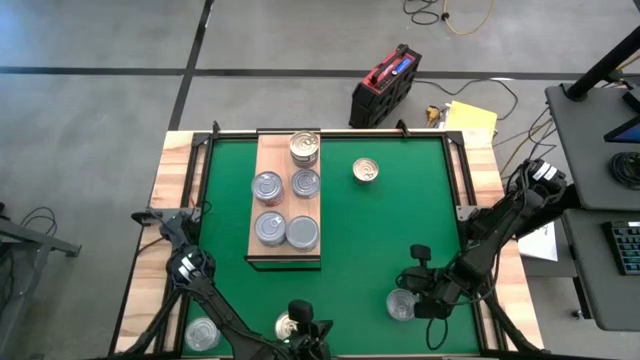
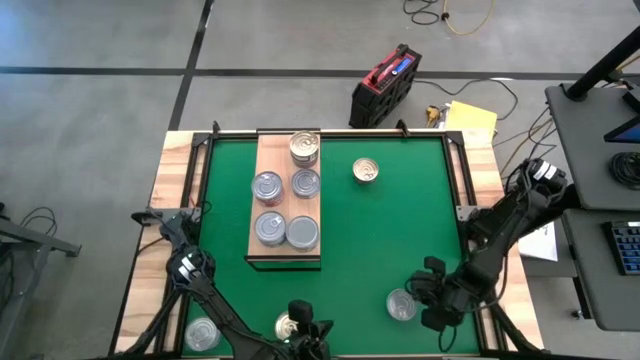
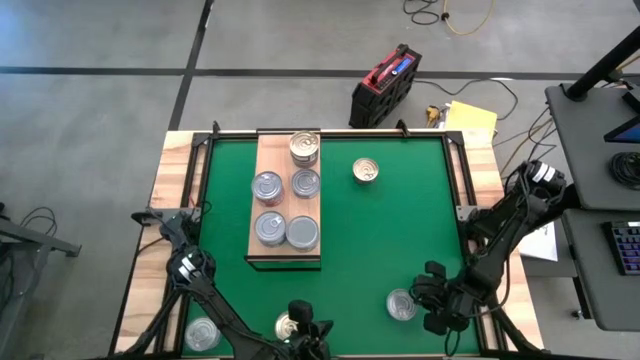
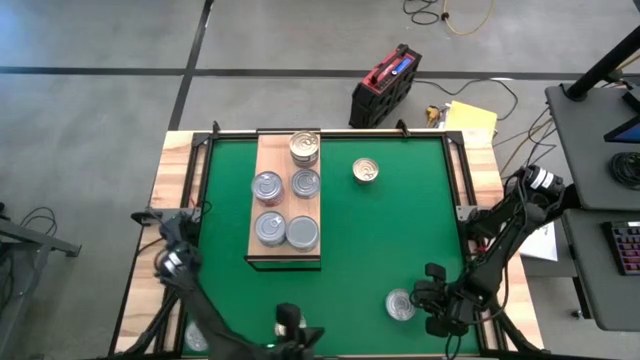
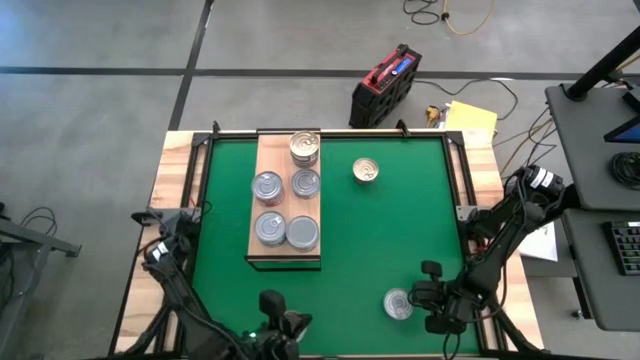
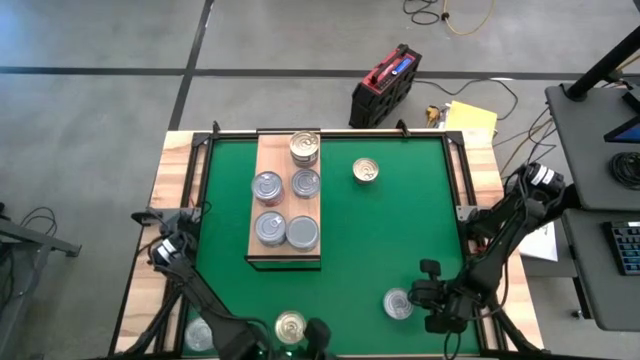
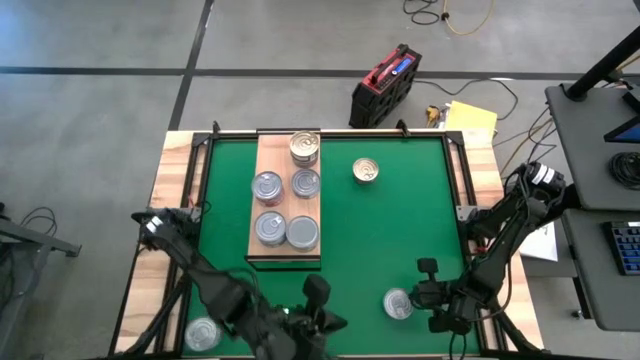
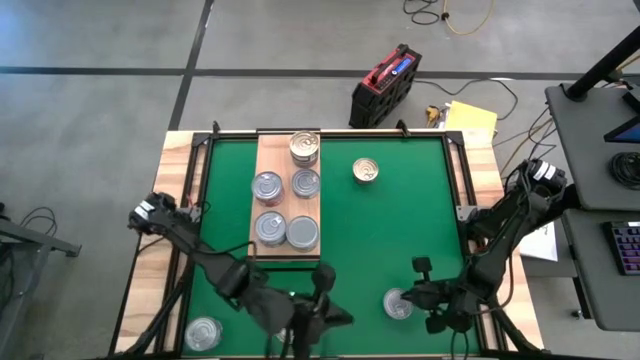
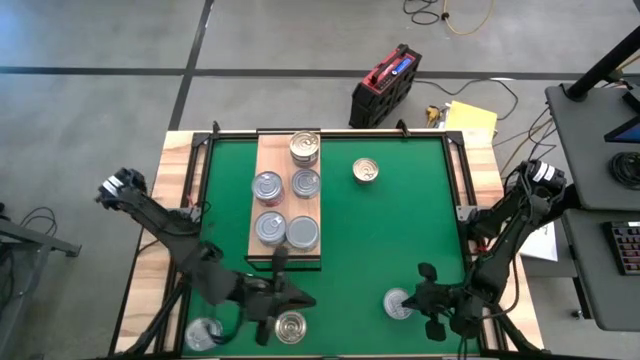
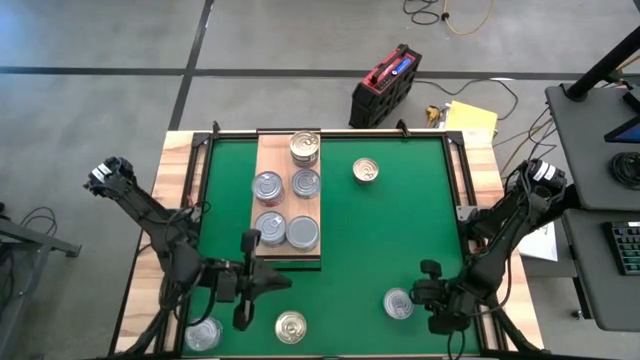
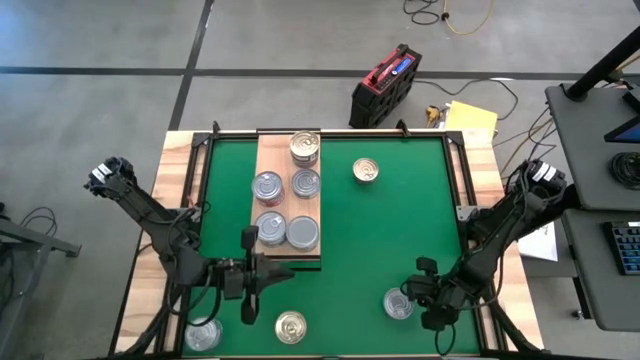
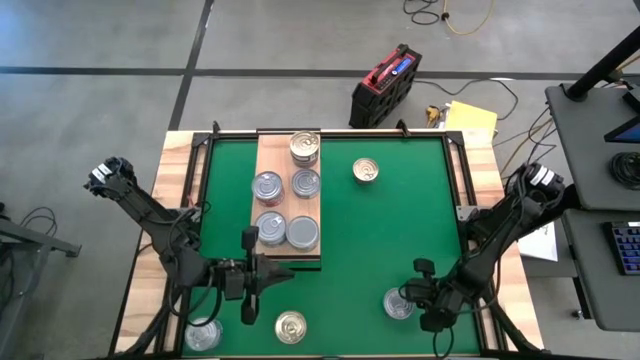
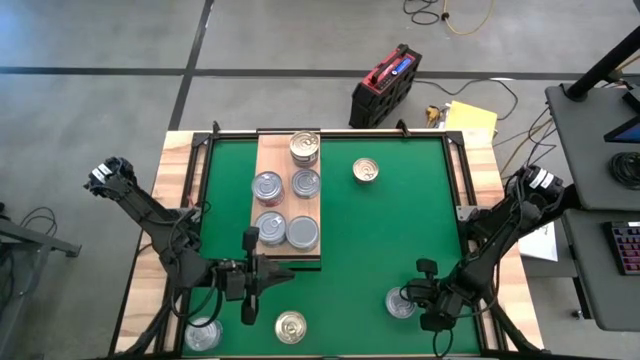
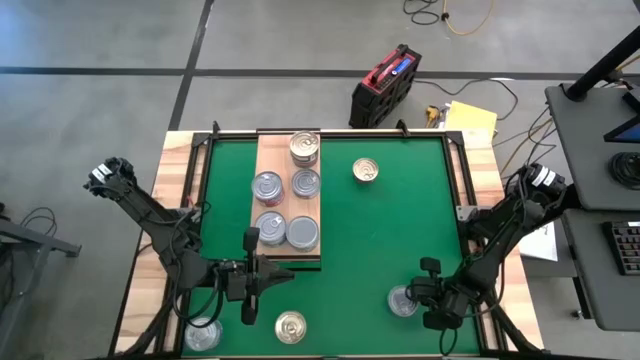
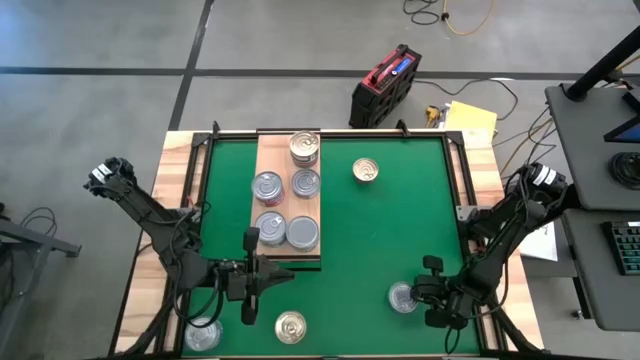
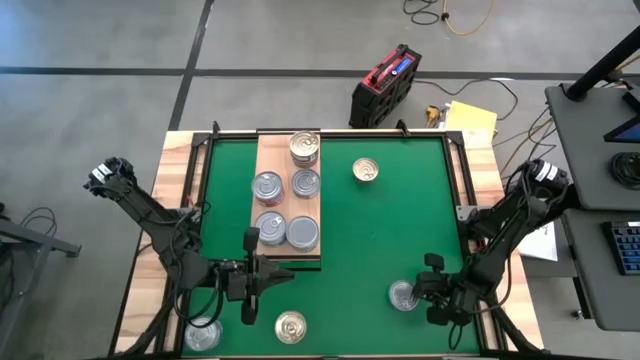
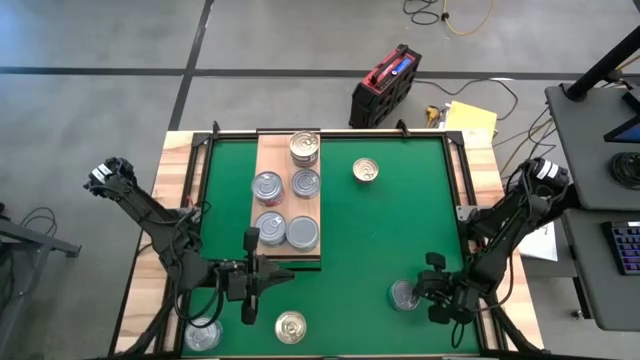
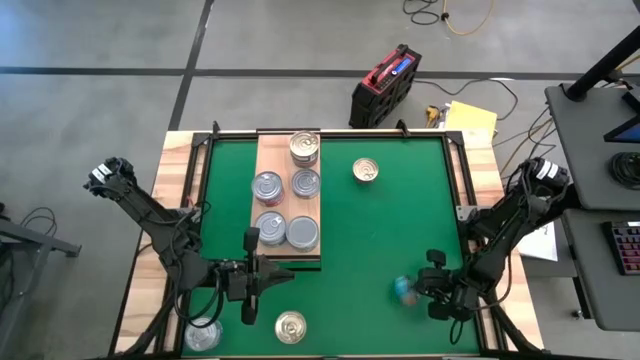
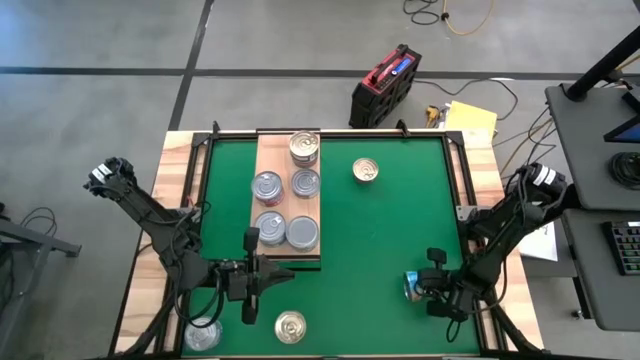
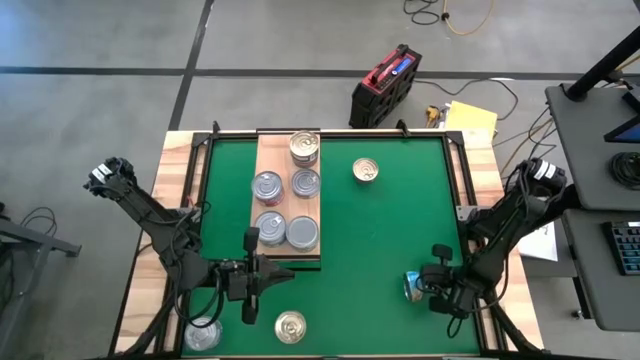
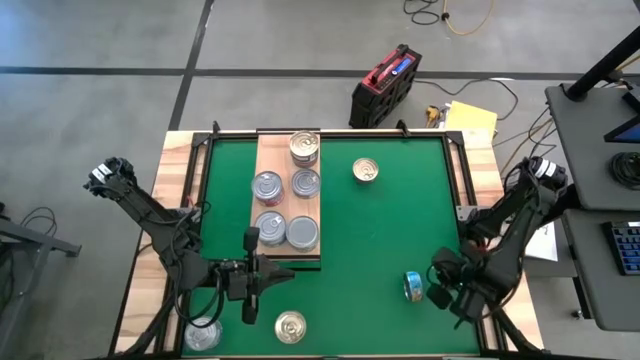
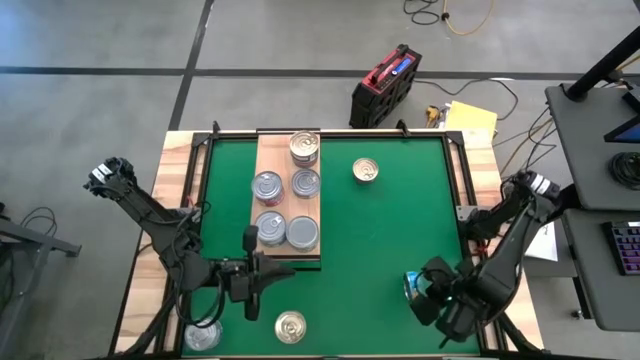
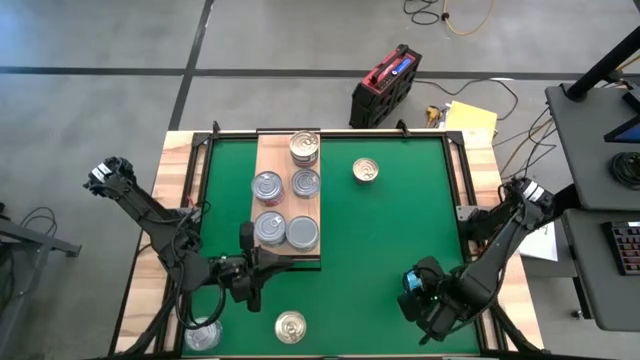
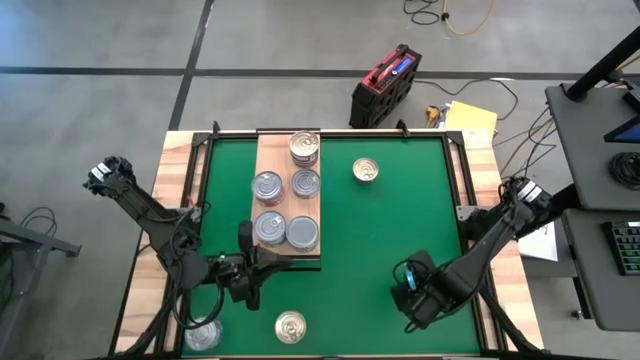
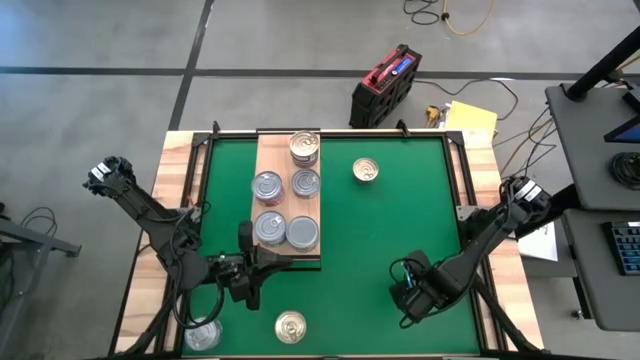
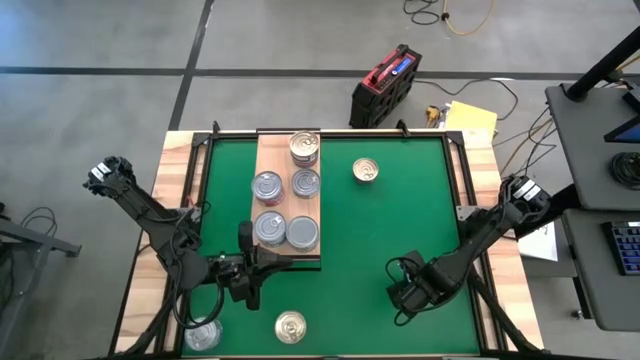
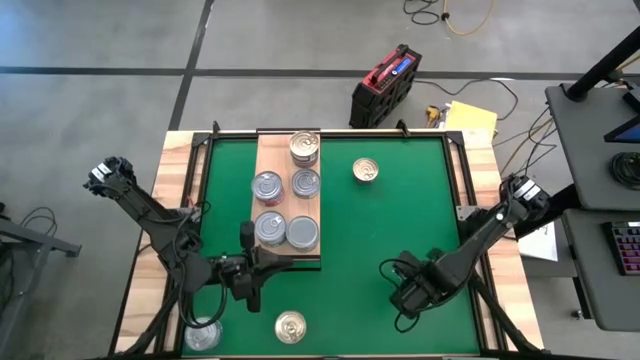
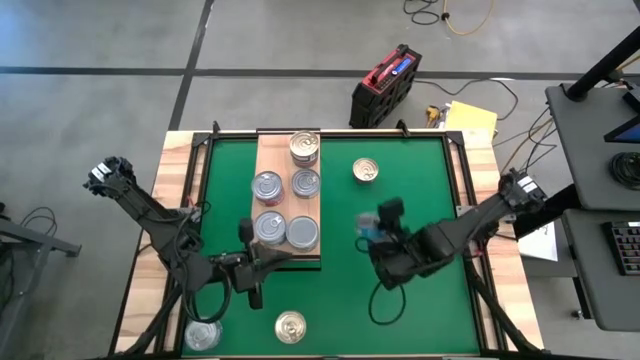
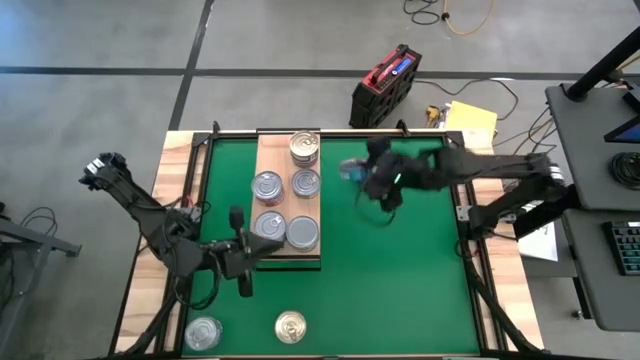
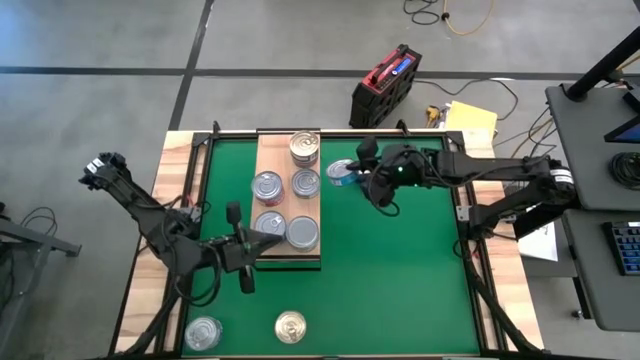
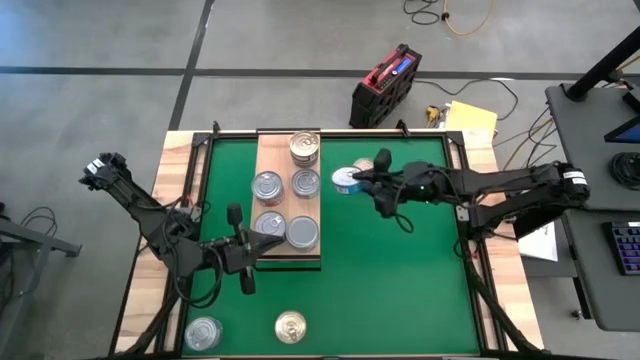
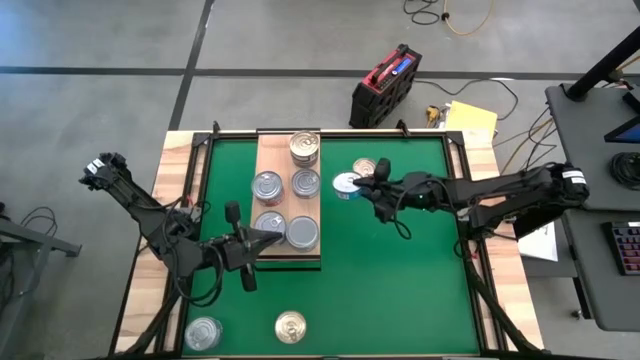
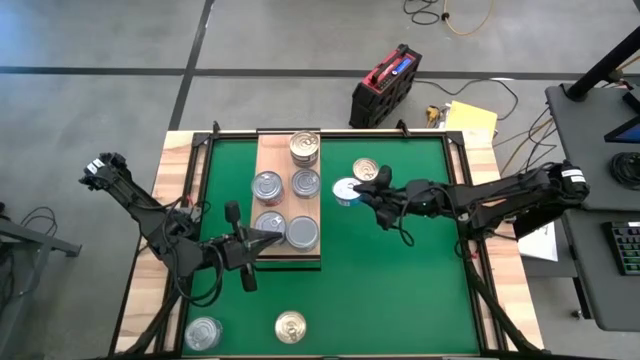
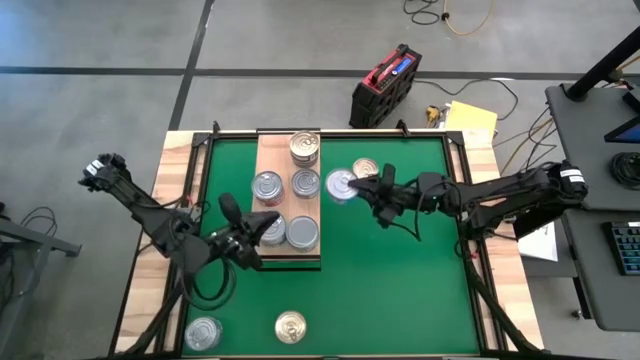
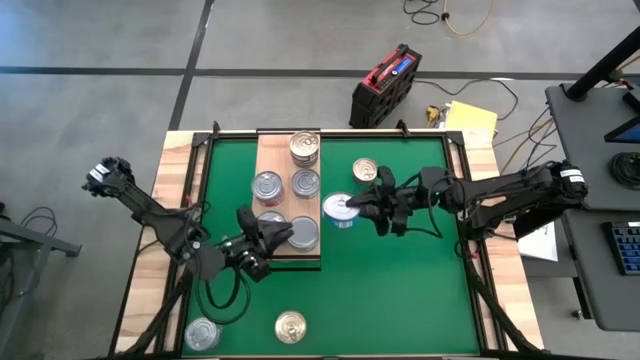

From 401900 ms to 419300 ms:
Task: Stack canned seafood by type on shelf
Put the yellow and blue tuna can on the shelf

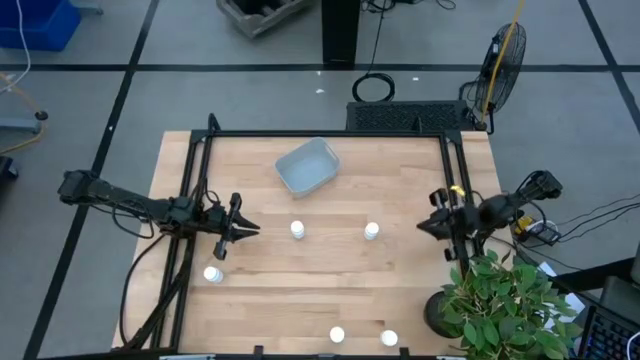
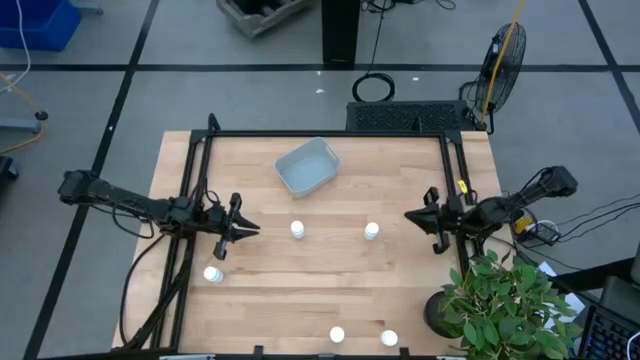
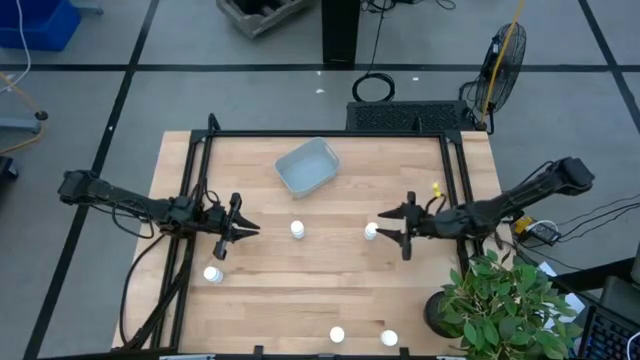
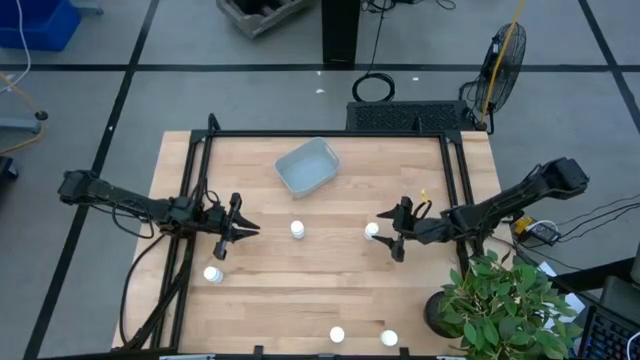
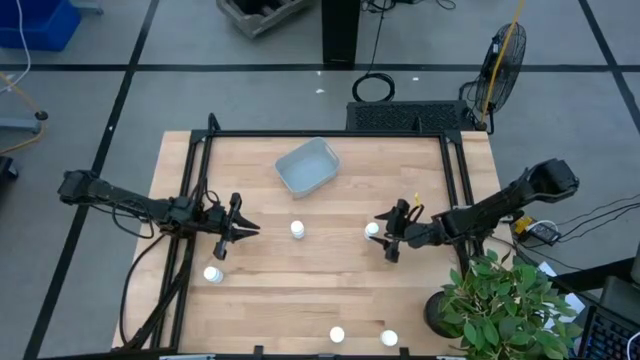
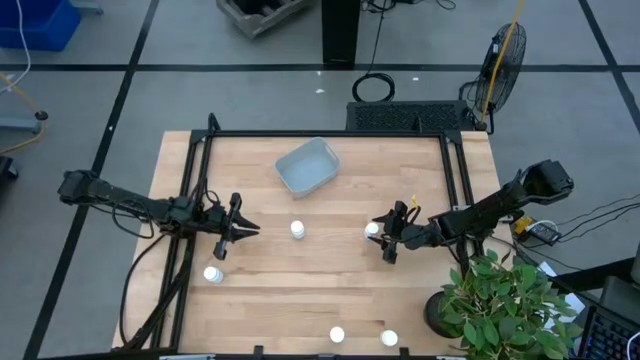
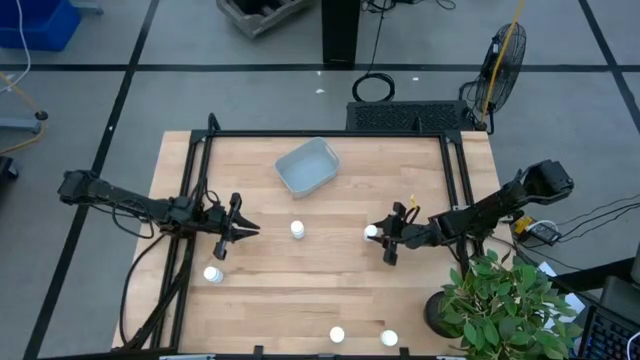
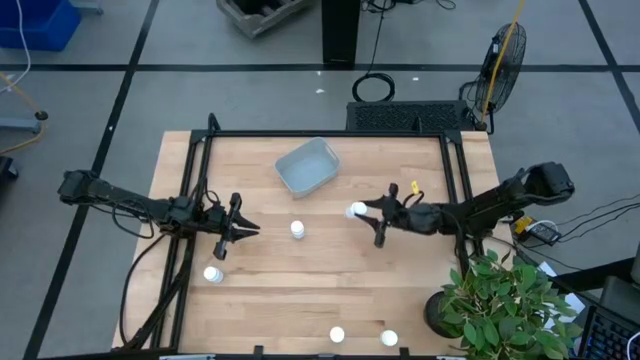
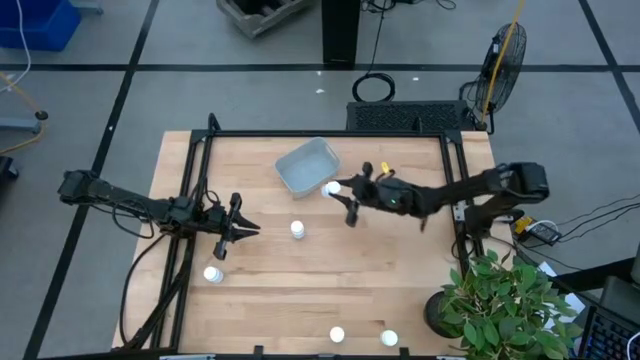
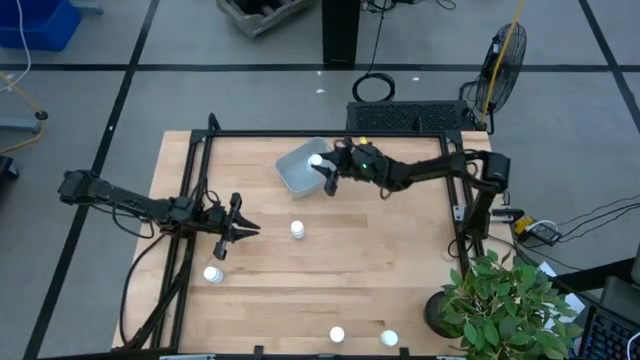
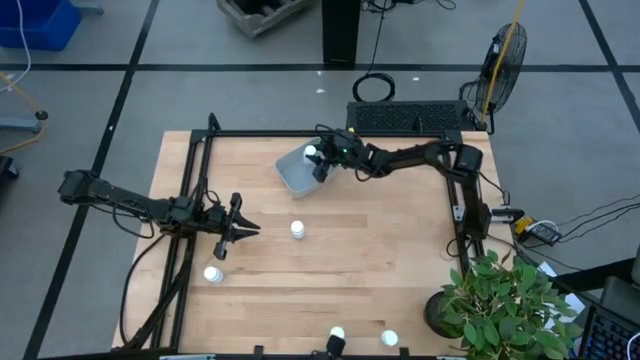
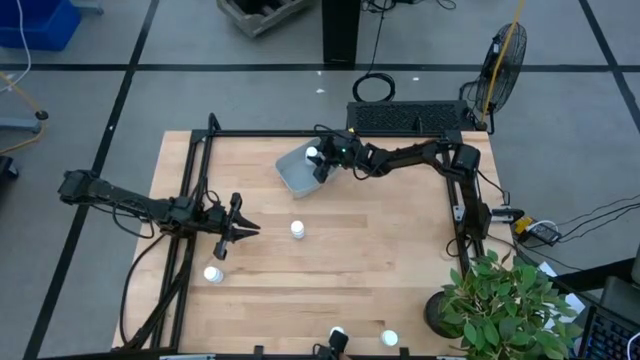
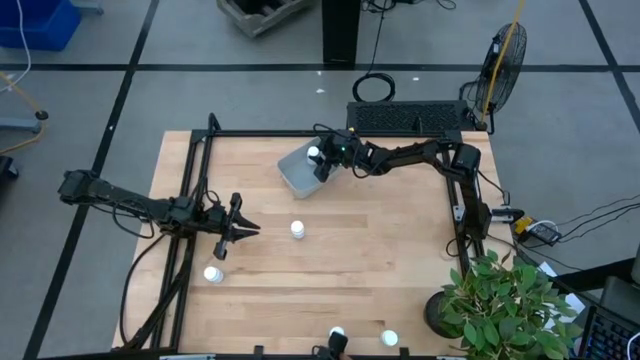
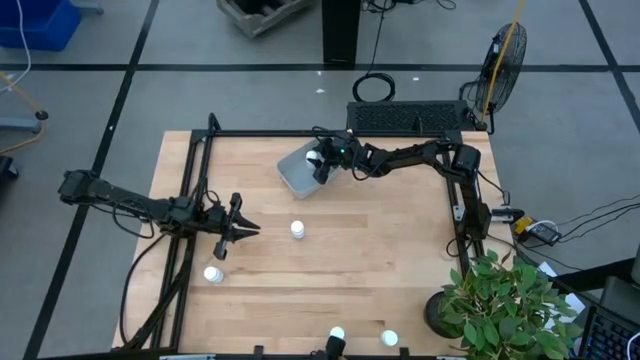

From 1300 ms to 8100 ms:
Task: Pick and place pill bottles into a basket
Put the white medicine bottle into the gray bin
